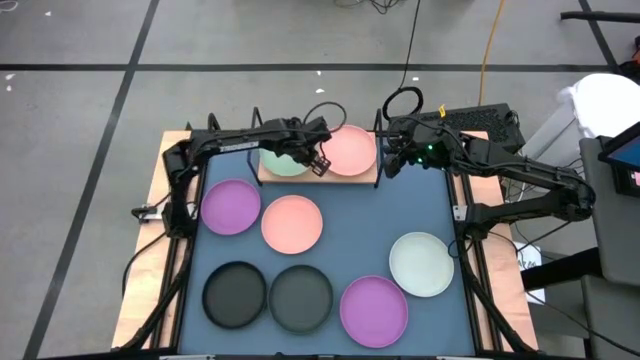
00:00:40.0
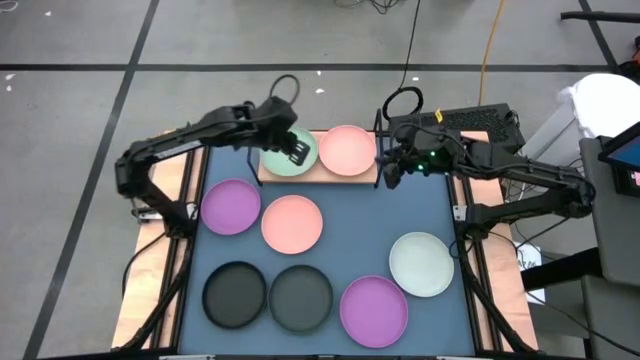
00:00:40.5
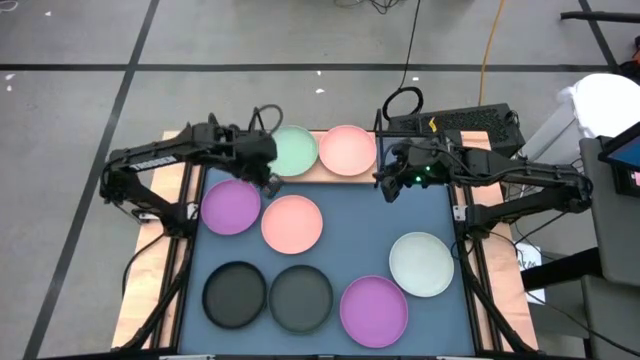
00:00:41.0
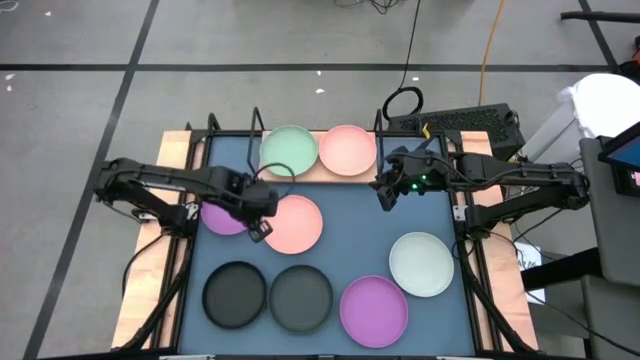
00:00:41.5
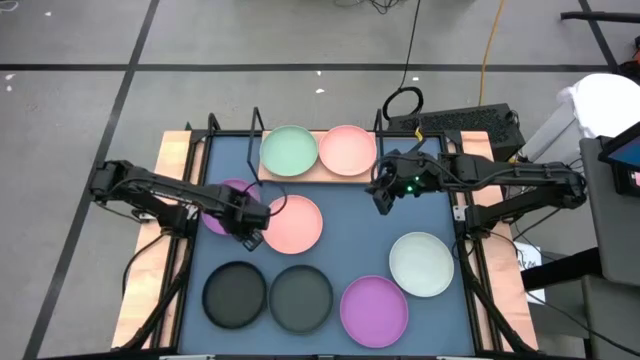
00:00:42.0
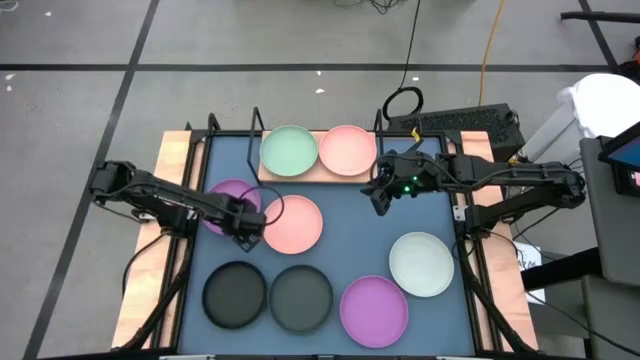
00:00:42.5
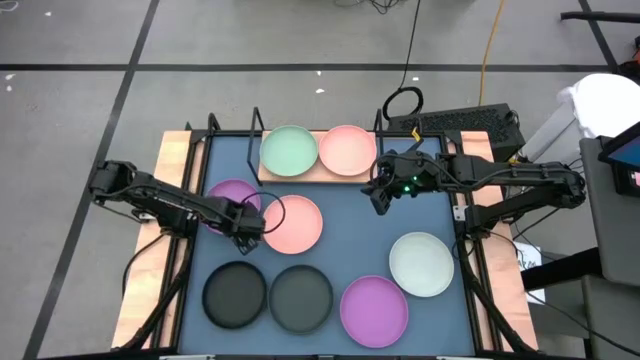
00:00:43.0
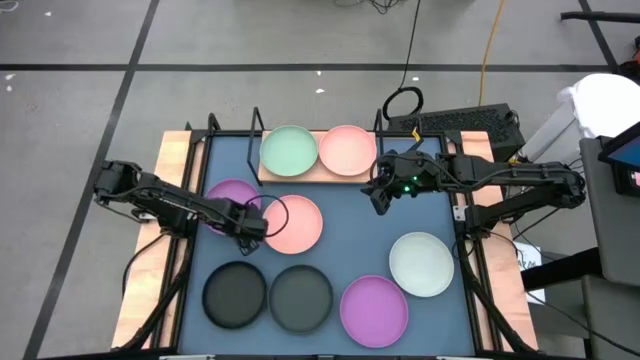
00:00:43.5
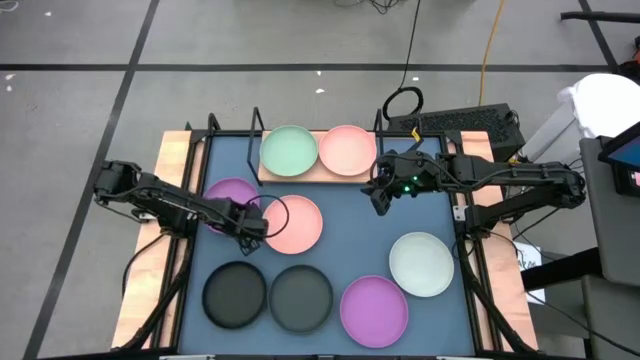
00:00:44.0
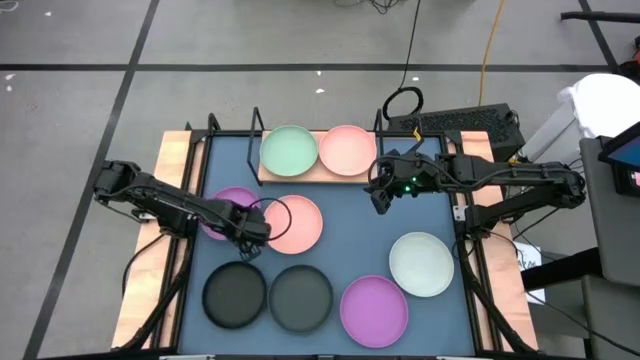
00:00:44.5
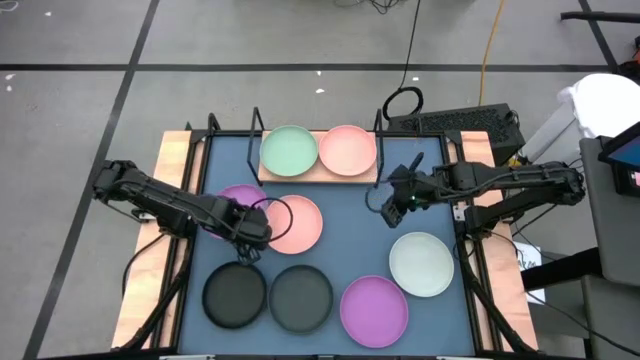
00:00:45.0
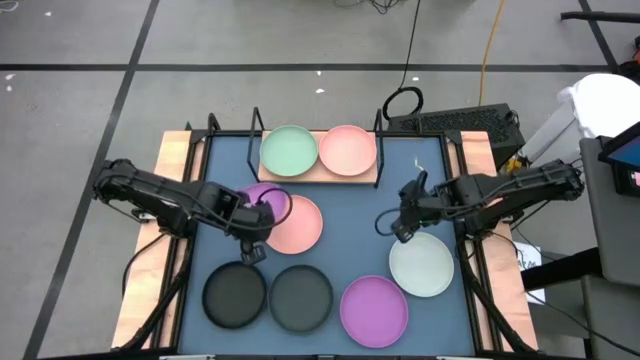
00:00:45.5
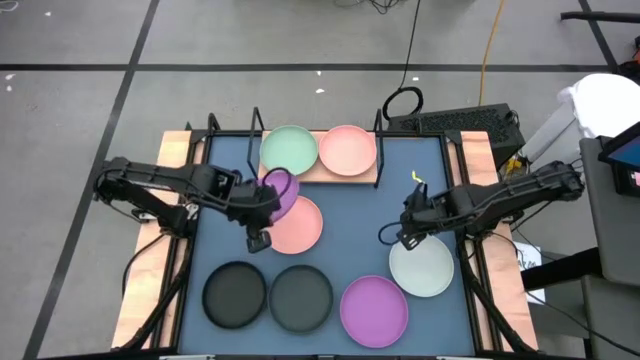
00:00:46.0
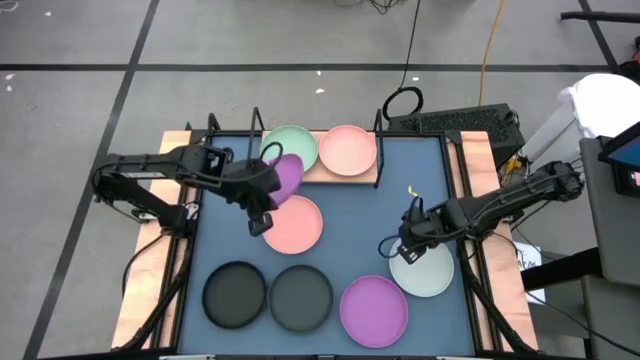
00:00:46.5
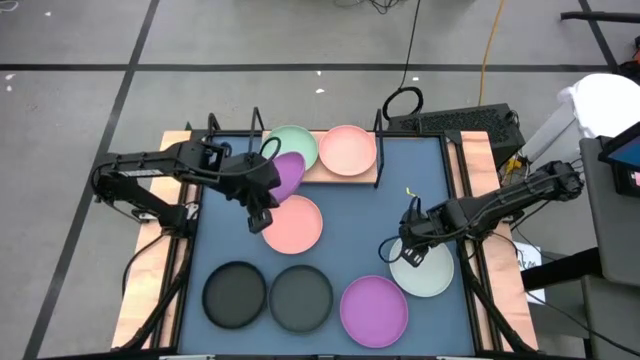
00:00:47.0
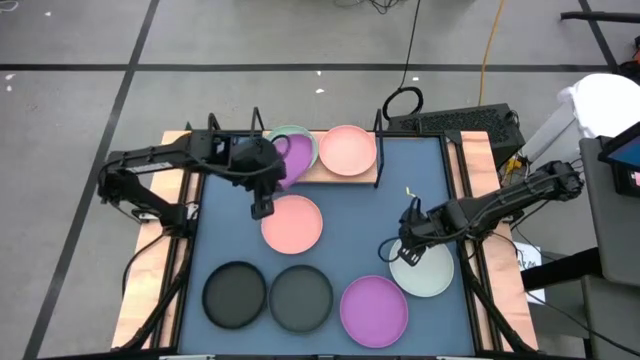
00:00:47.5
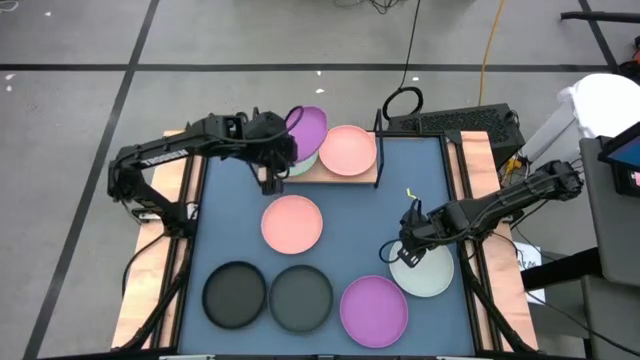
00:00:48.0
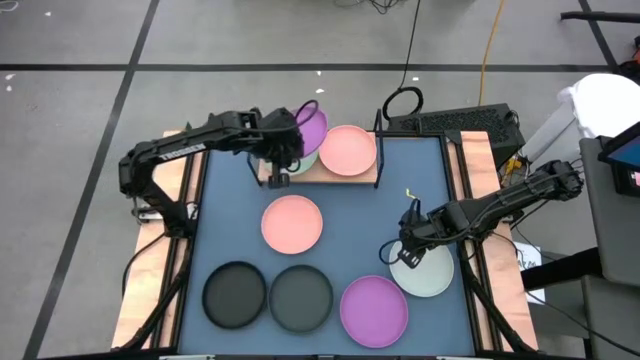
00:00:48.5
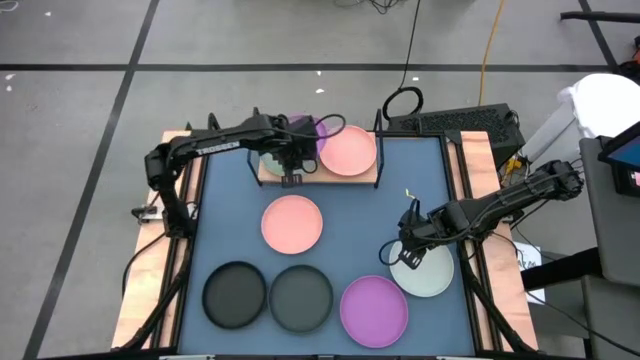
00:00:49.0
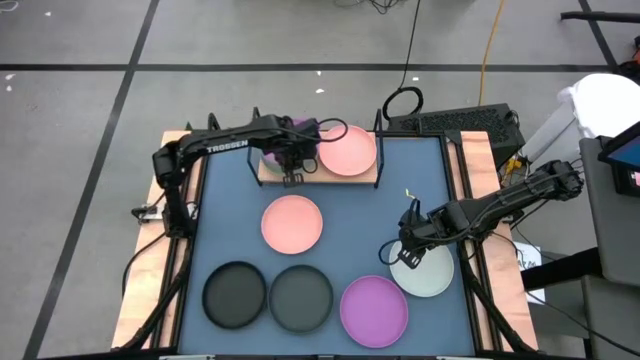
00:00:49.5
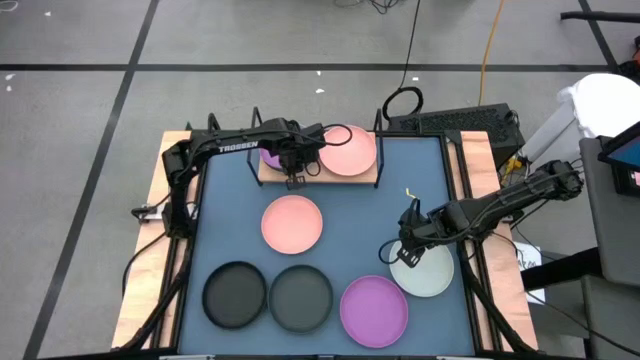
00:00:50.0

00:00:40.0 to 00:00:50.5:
Task: Place and stack plates onto a shelf
Stack the left purple plate on top of the green plate

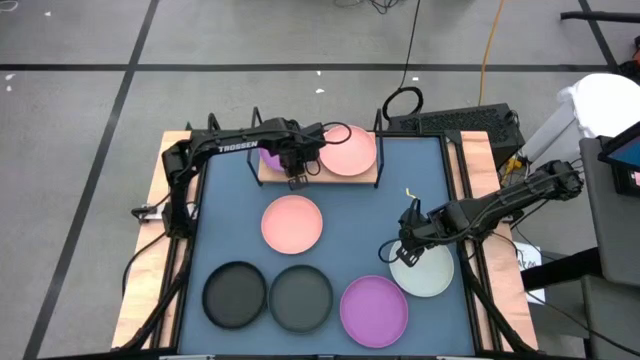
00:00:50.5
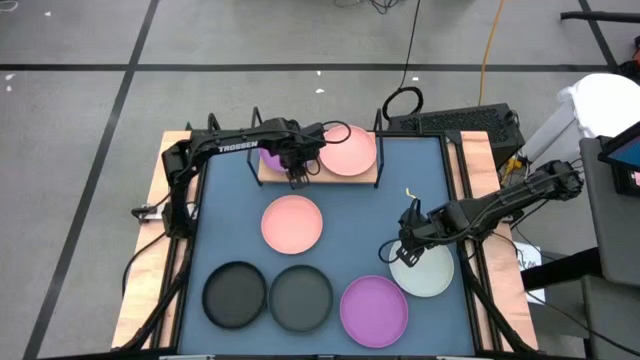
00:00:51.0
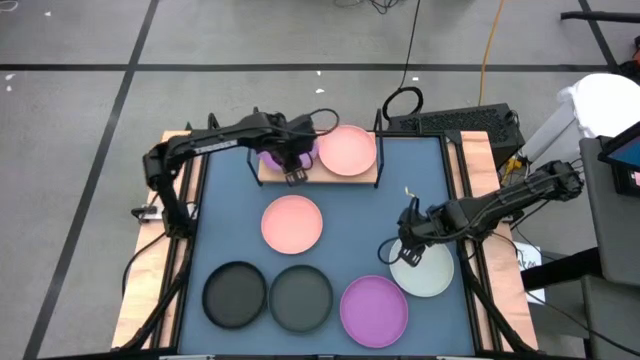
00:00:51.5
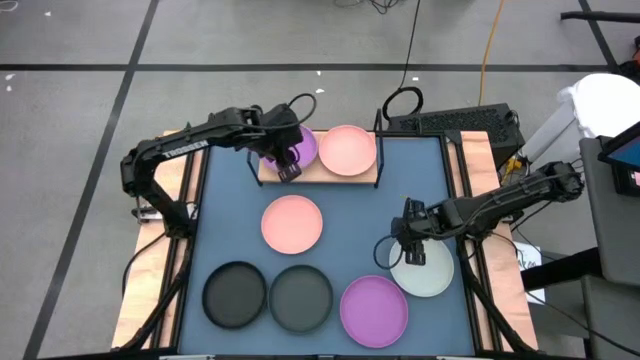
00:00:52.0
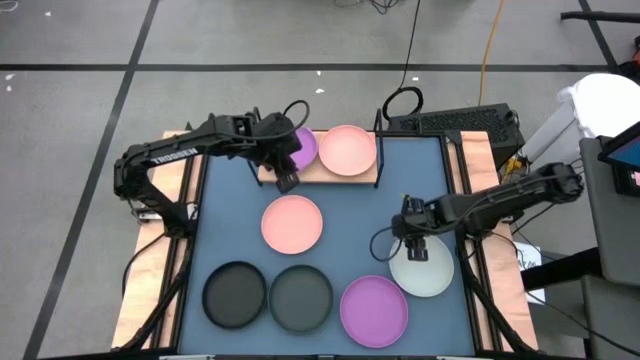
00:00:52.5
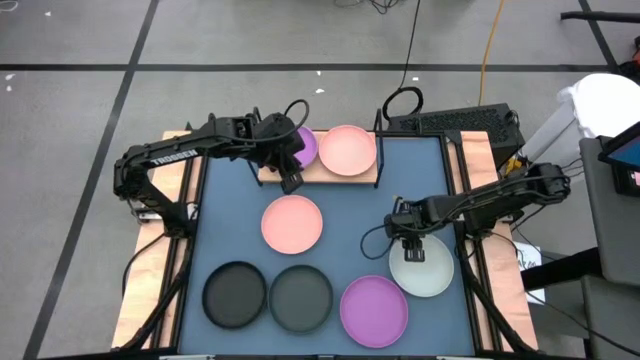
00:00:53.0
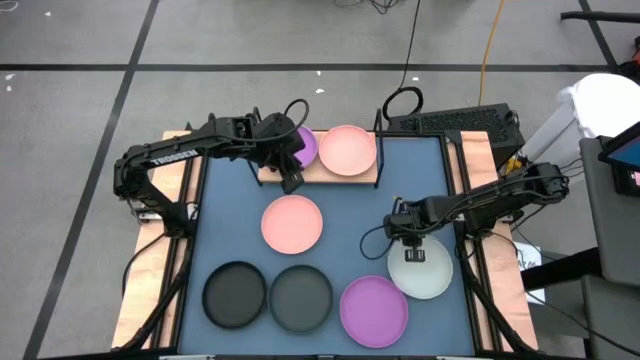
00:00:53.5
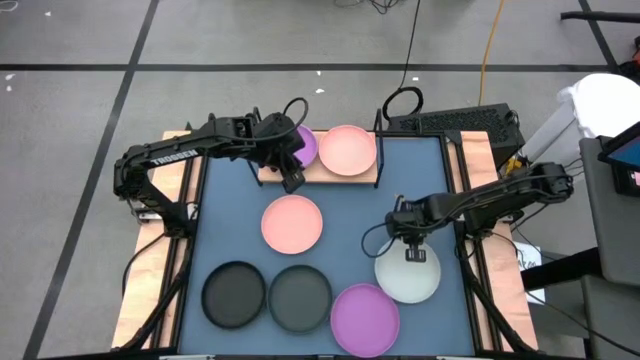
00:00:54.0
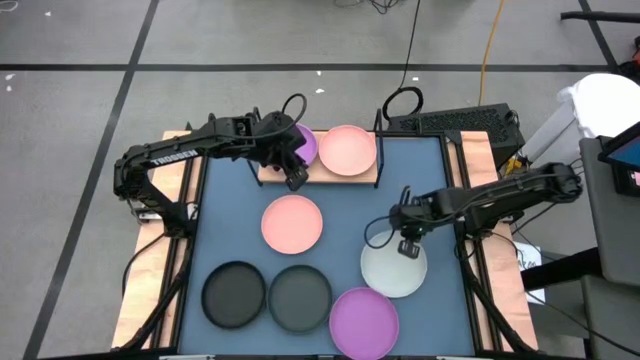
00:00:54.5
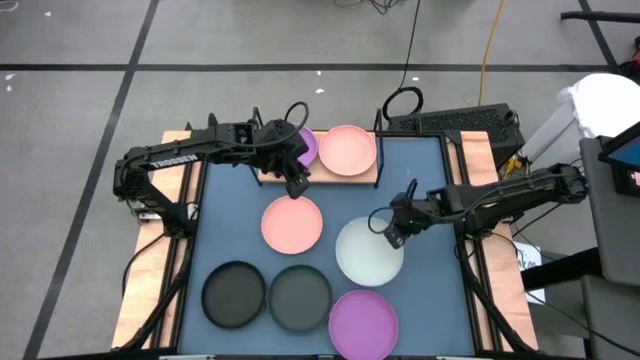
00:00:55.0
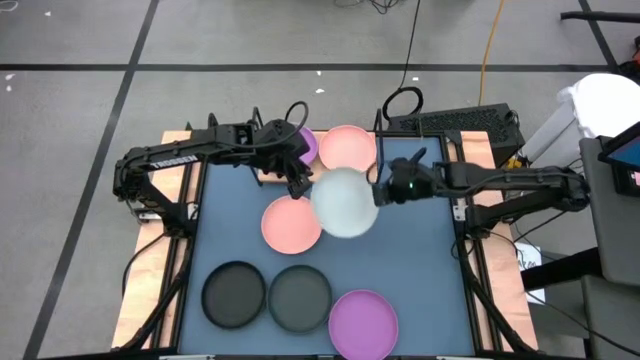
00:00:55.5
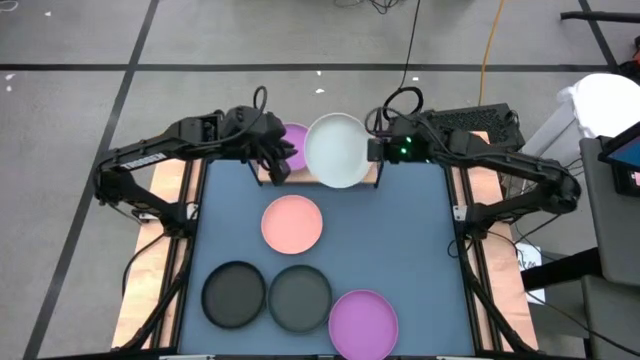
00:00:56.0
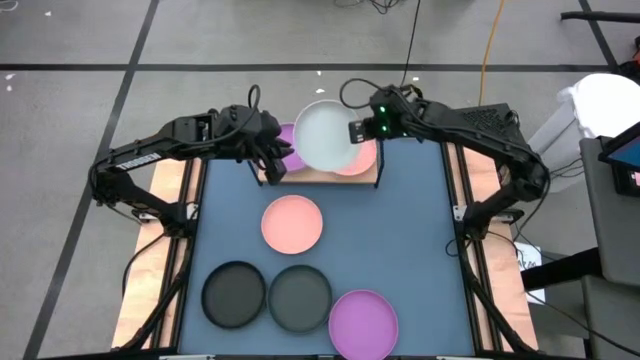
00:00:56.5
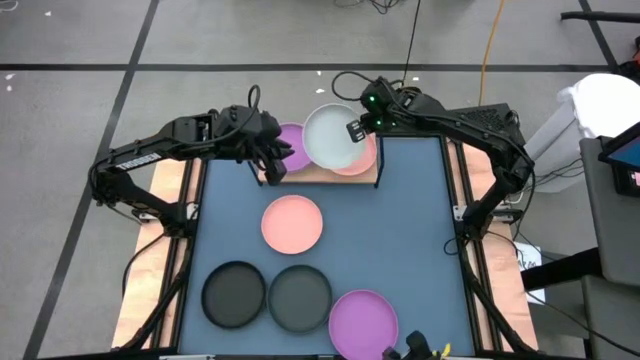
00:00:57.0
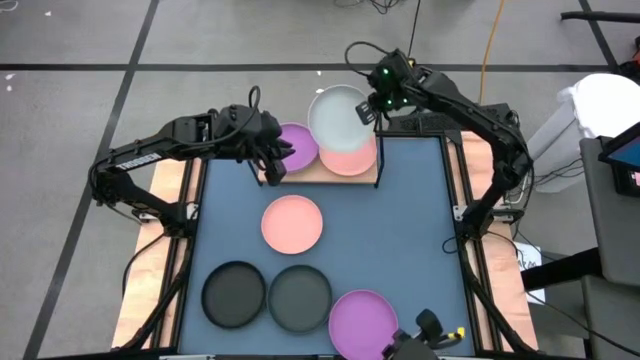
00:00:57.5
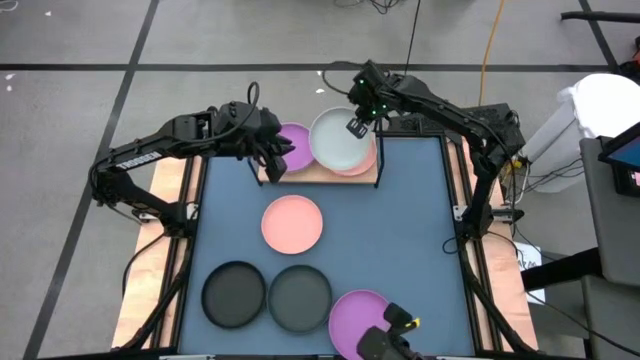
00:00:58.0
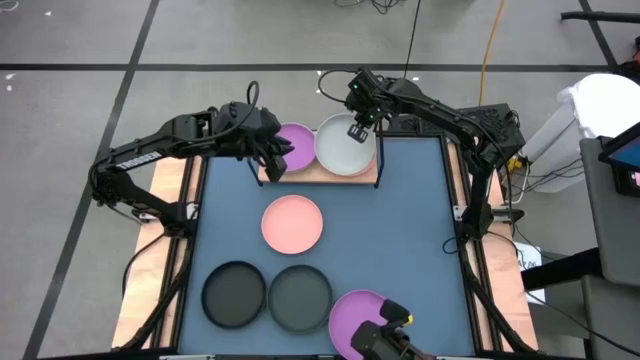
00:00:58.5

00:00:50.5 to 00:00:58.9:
Stack the gray plate on top of the pink plate

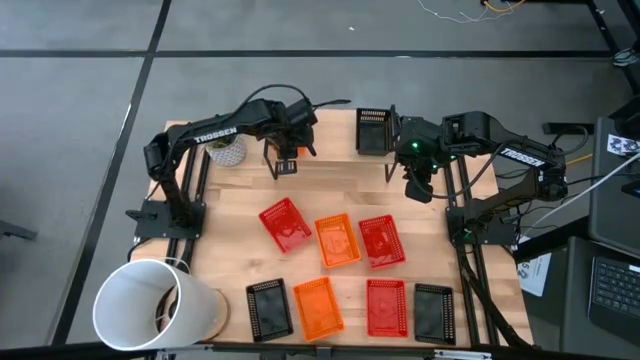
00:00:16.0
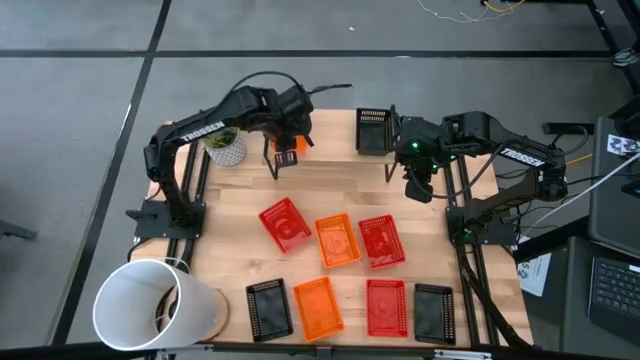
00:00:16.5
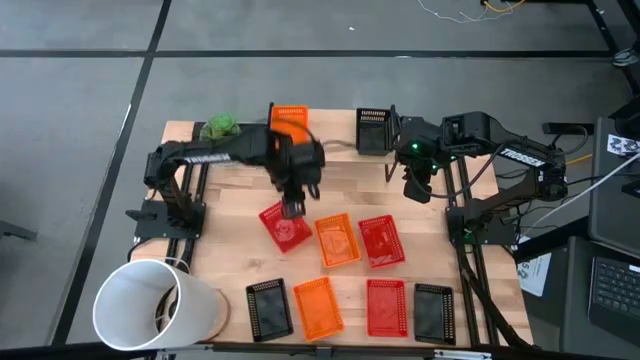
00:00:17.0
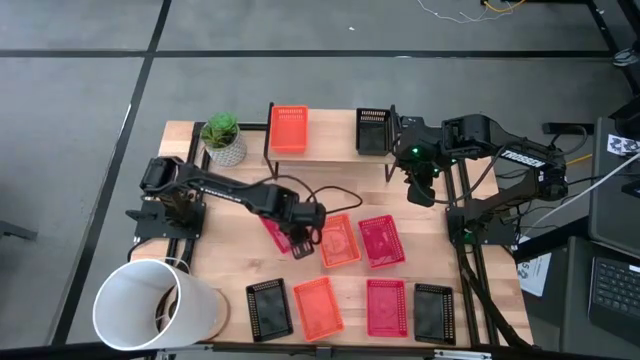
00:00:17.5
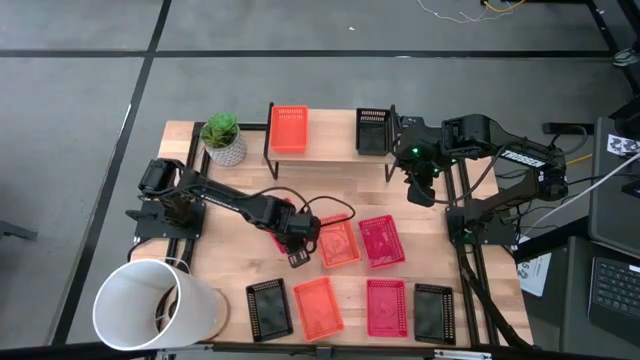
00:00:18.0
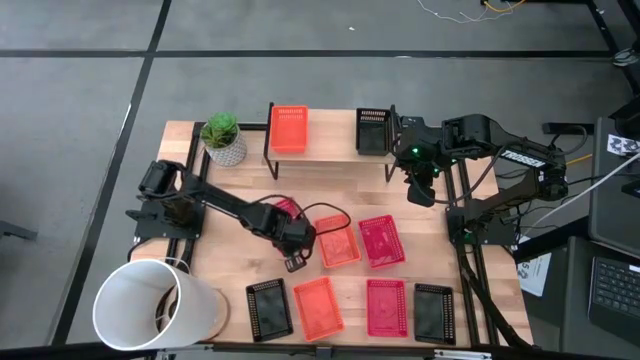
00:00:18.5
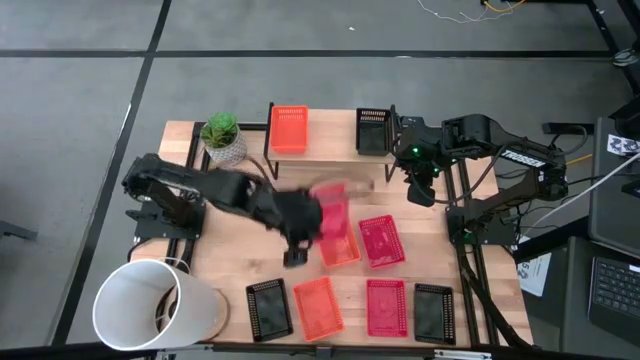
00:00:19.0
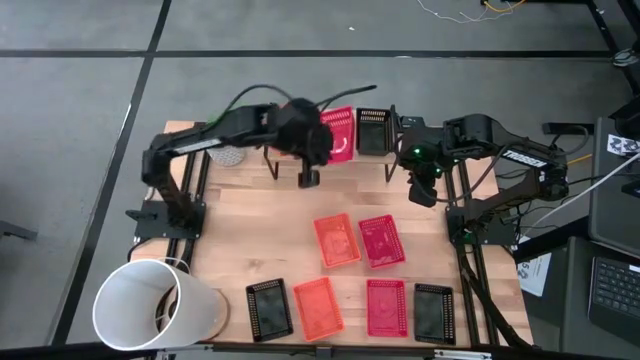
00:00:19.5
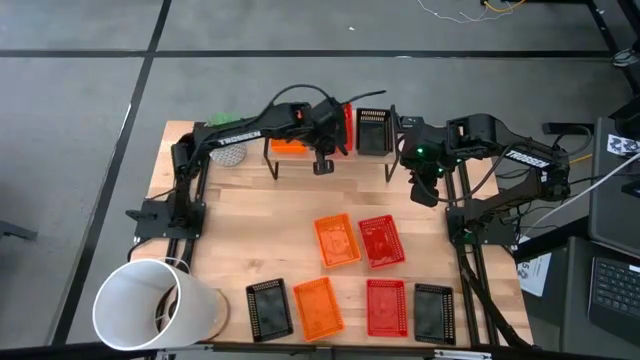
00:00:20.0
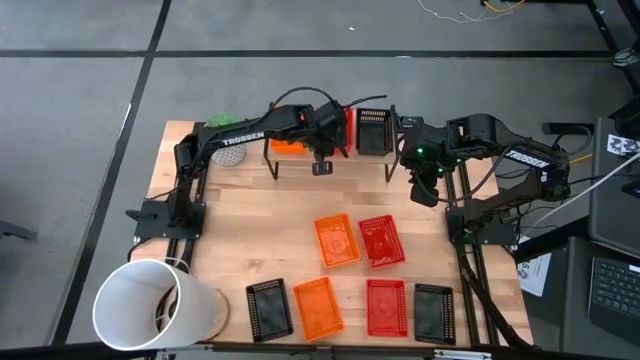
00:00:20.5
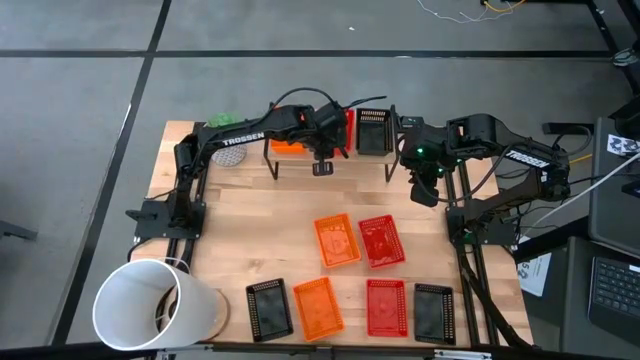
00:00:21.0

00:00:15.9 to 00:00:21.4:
Task: Stack baskets on shelf by color
Put the top left red bin on the shelf between the orange and black bins
